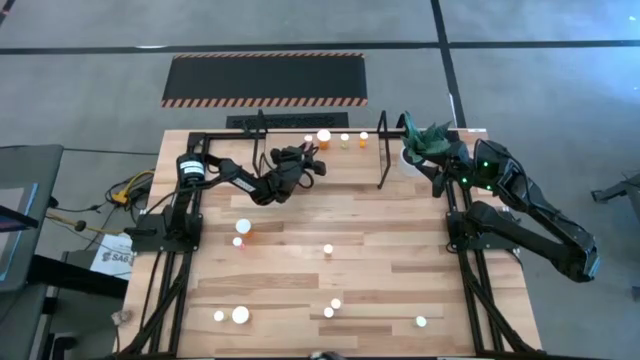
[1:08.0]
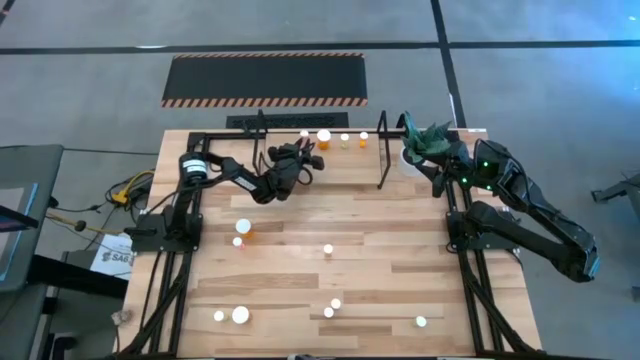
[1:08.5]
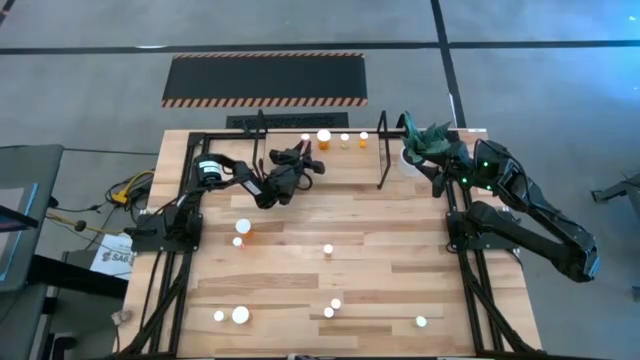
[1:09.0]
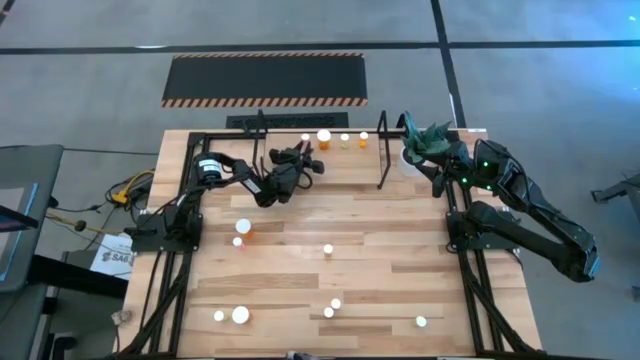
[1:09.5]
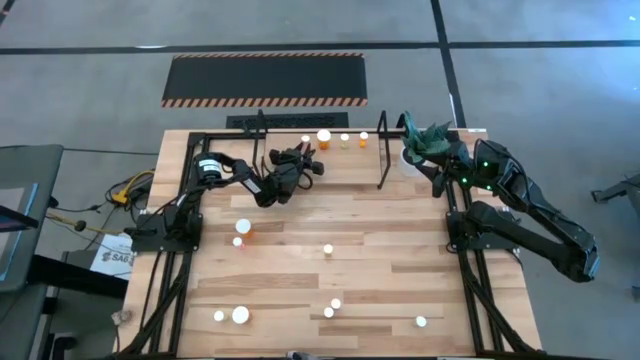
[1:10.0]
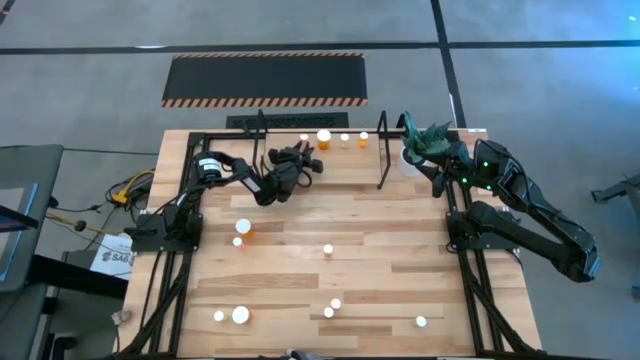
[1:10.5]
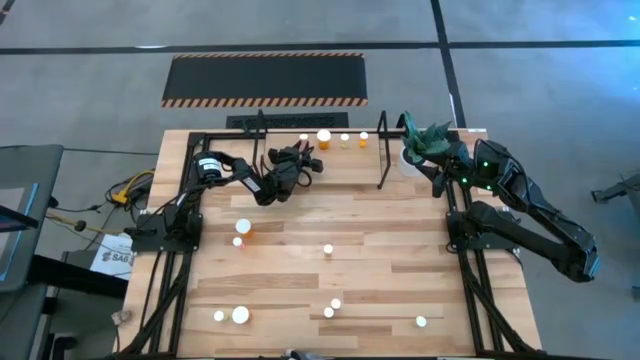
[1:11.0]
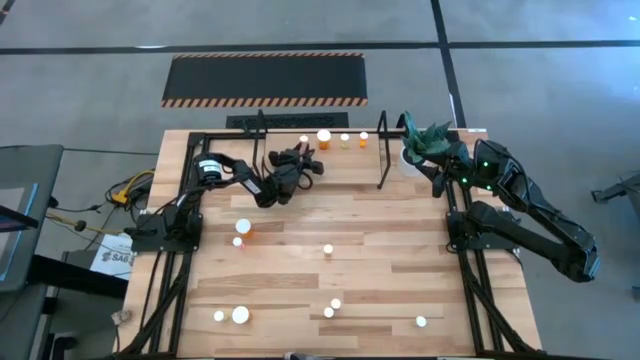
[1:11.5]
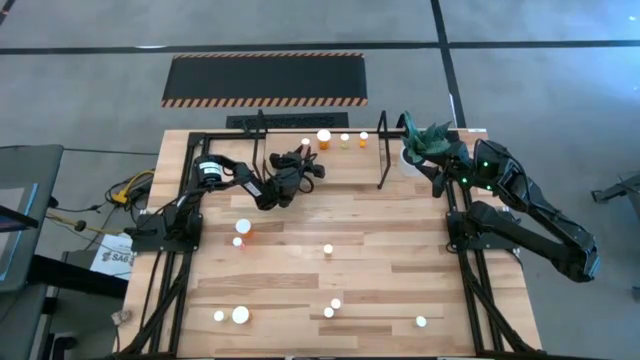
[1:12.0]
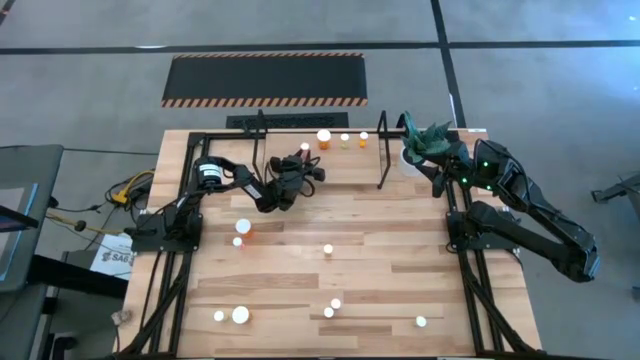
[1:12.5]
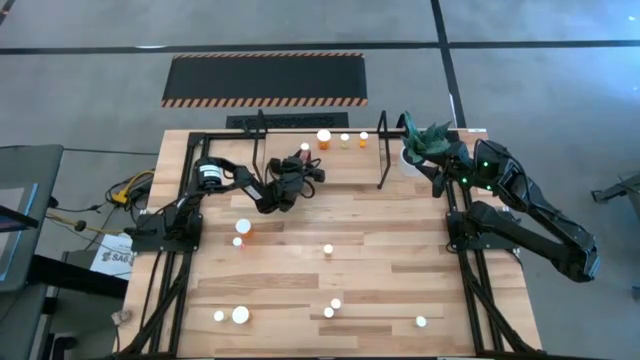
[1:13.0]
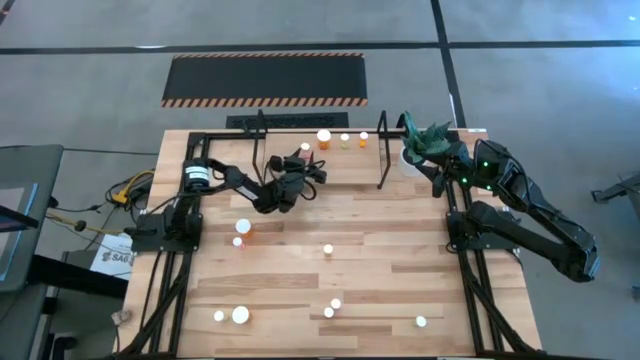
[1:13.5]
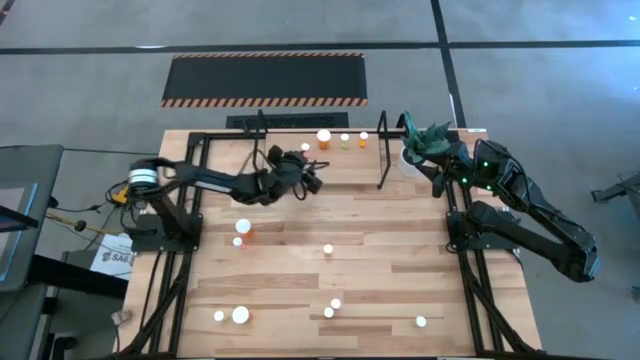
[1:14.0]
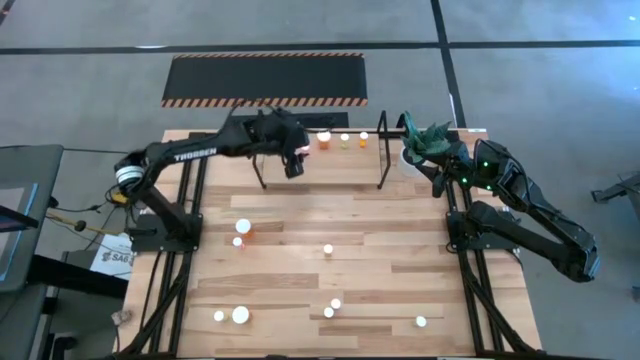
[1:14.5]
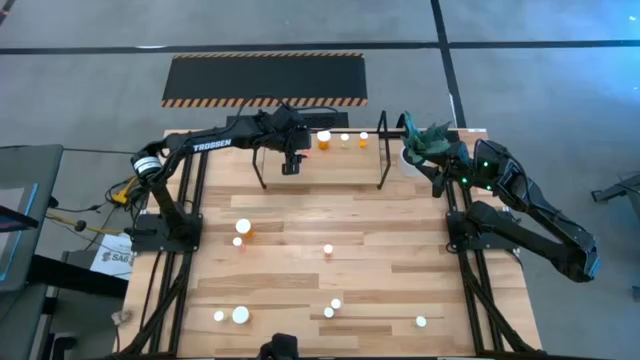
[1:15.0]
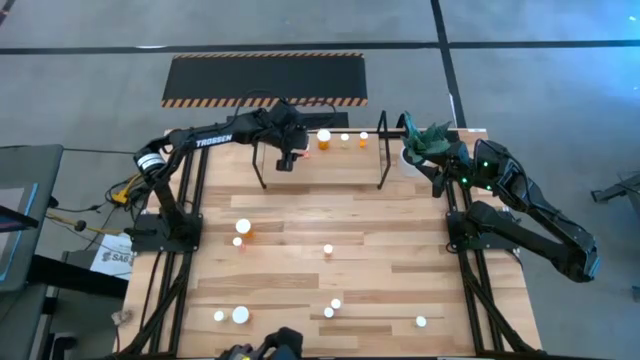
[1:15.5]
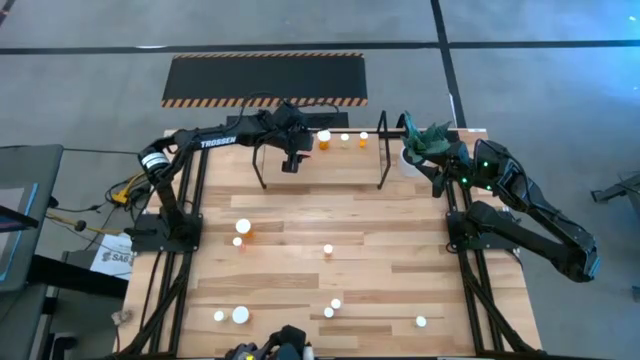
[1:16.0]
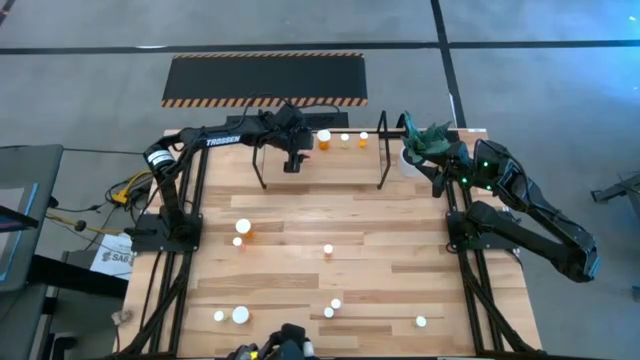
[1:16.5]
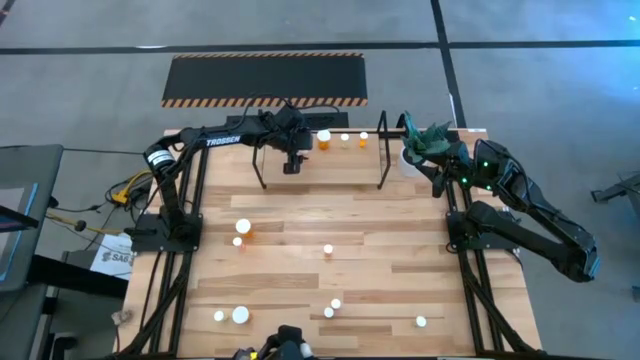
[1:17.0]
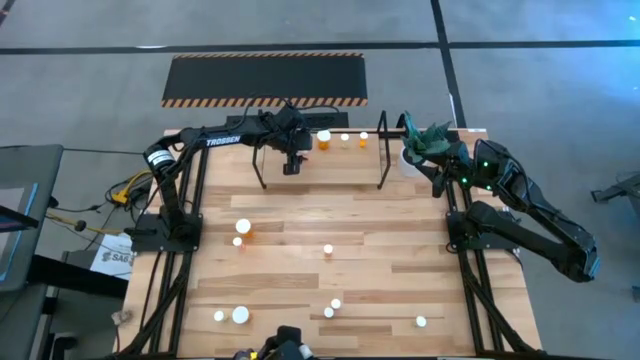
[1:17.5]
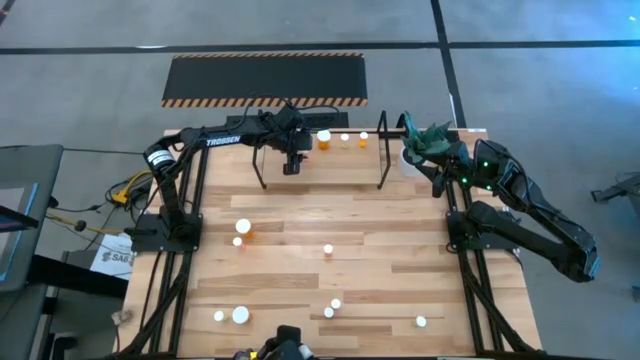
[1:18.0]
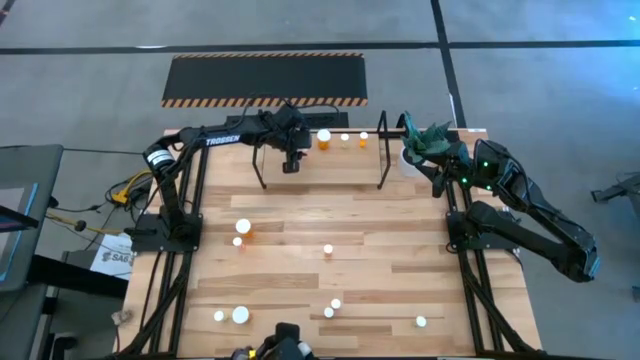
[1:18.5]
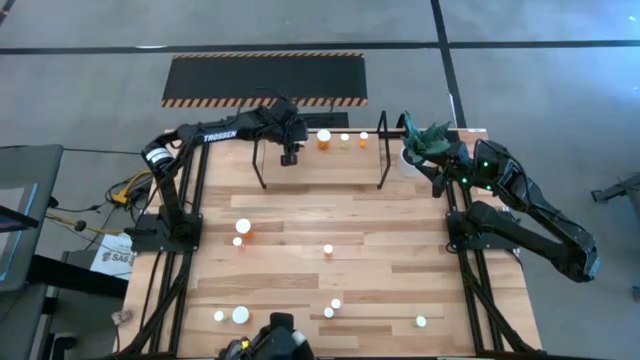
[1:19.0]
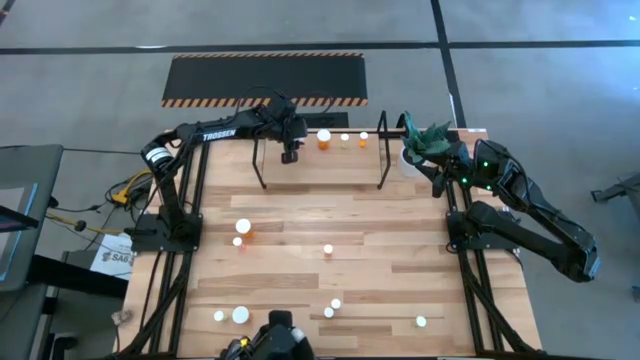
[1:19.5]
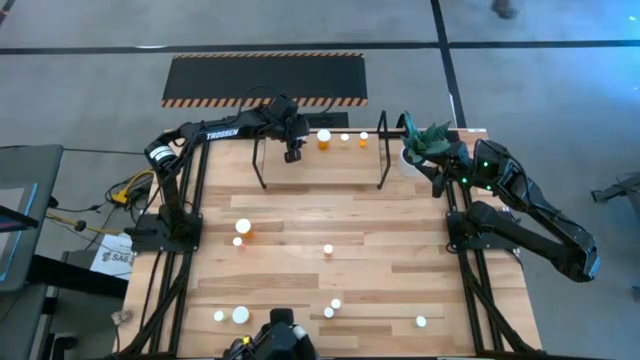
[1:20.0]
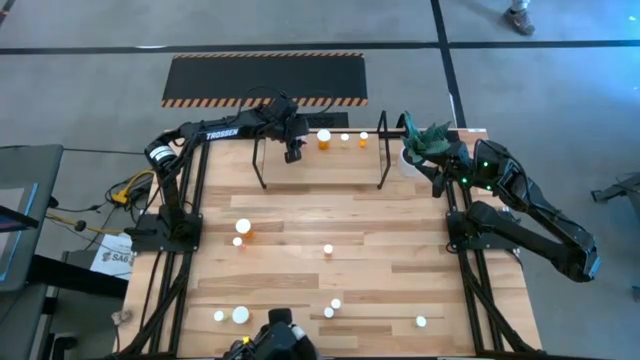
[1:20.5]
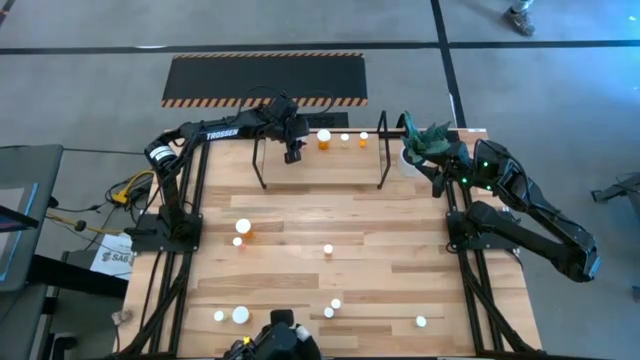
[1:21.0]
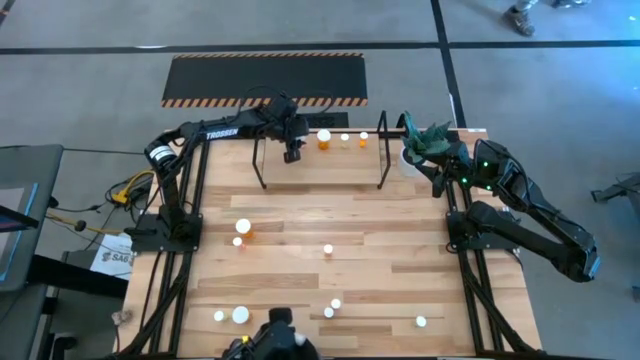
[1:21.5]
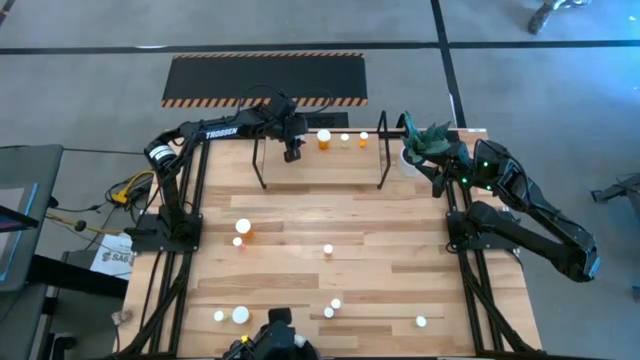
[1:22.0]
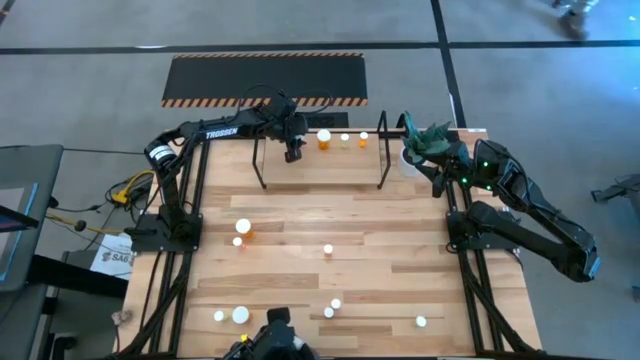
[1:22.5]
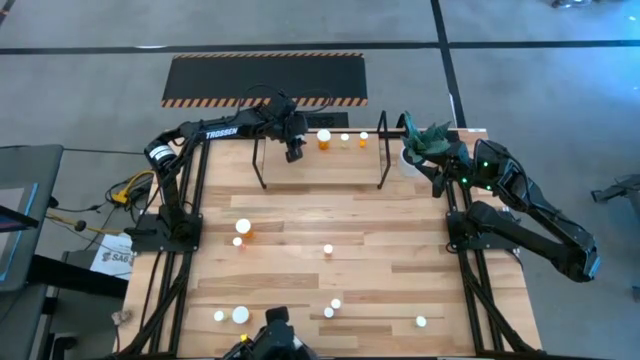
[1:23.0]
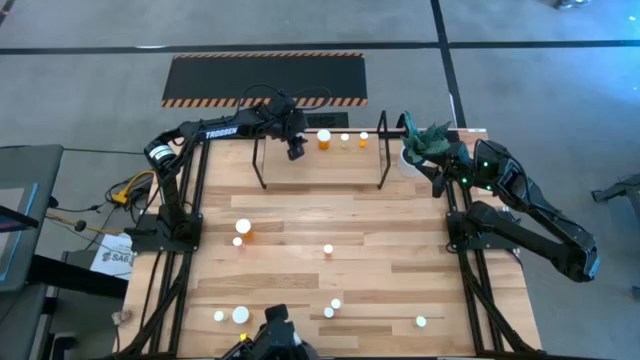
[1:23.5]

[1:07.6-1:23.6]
Task: Pick and place medicine bottles onto shelf by color
Put the top right small pink pill bottle on the shelf

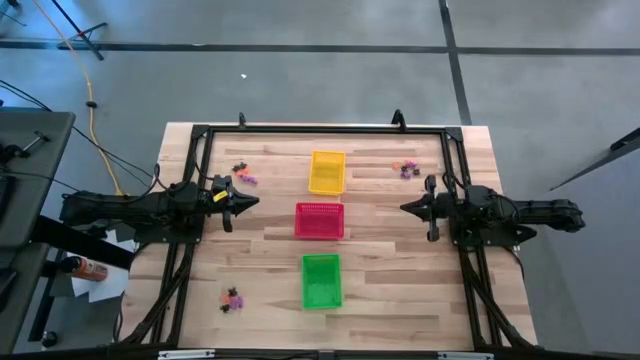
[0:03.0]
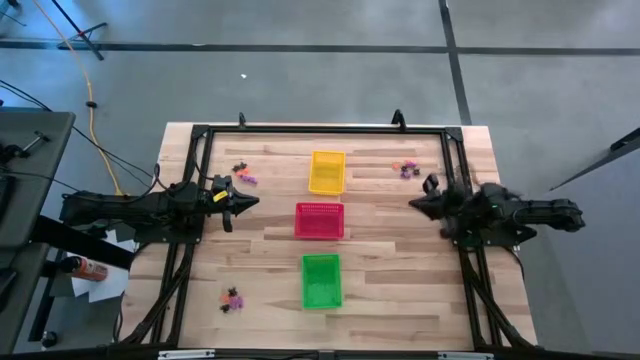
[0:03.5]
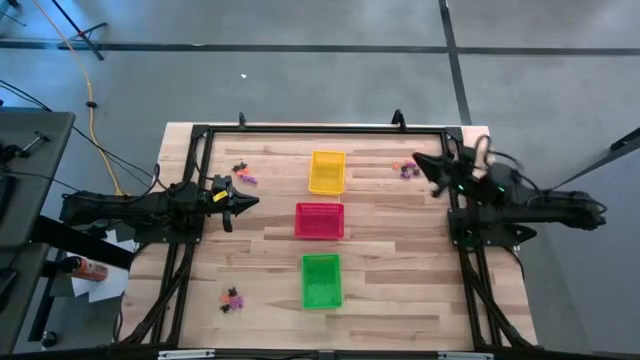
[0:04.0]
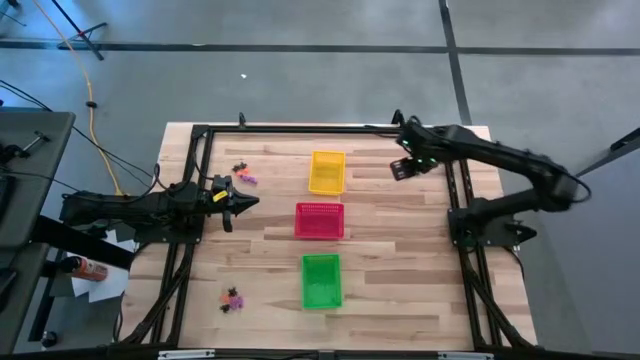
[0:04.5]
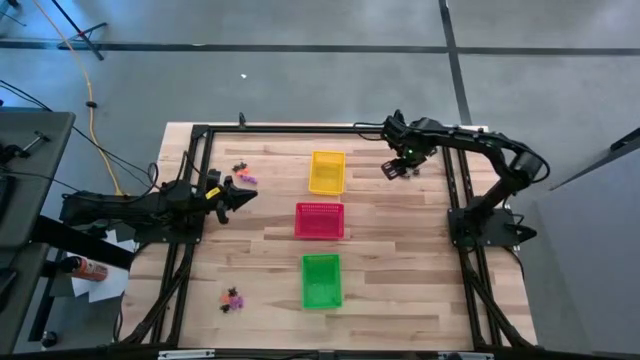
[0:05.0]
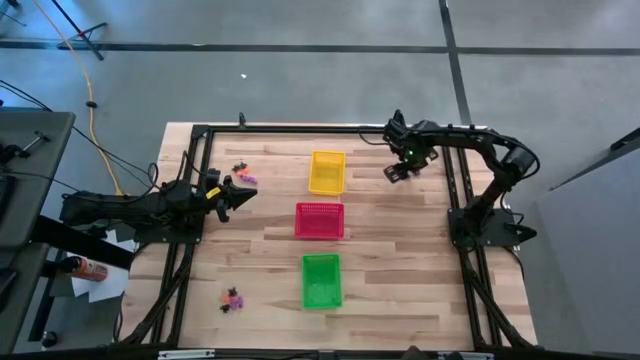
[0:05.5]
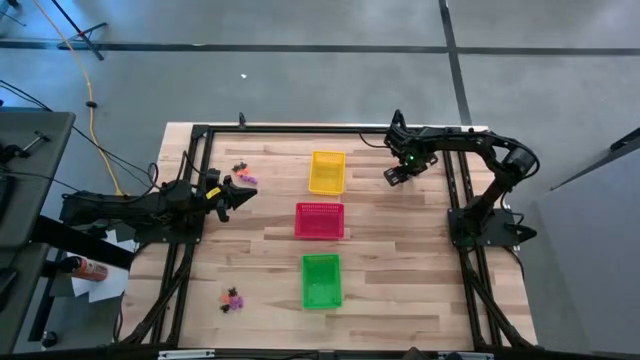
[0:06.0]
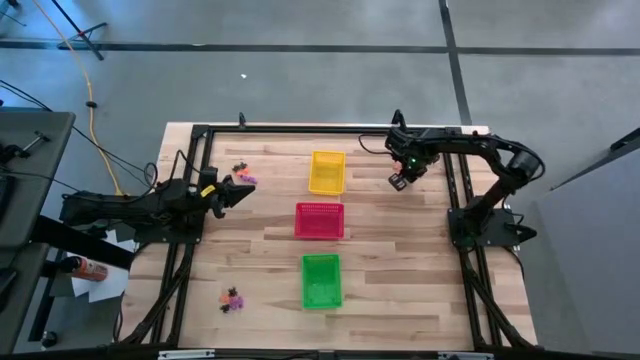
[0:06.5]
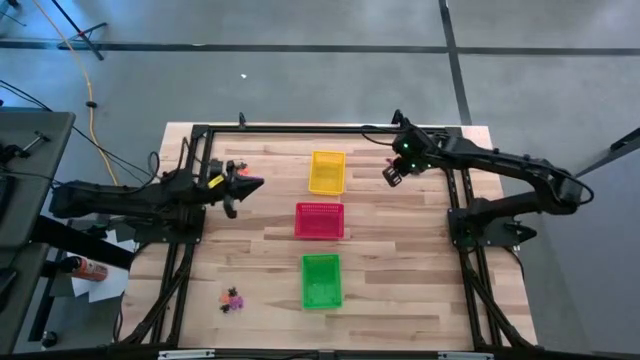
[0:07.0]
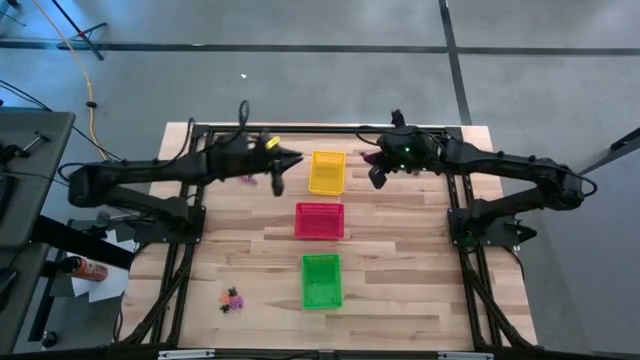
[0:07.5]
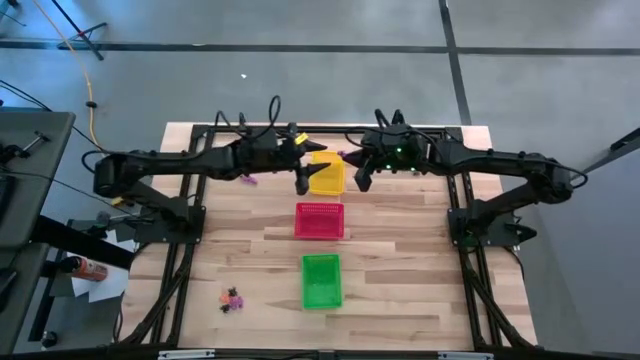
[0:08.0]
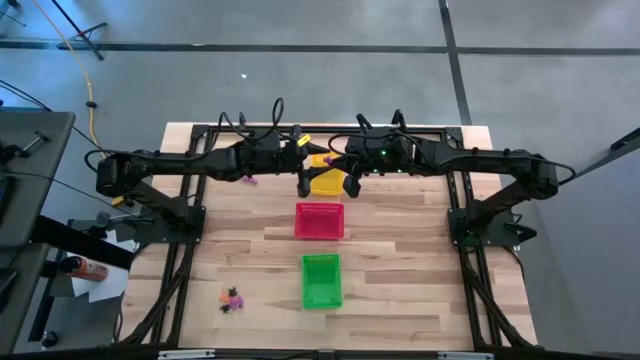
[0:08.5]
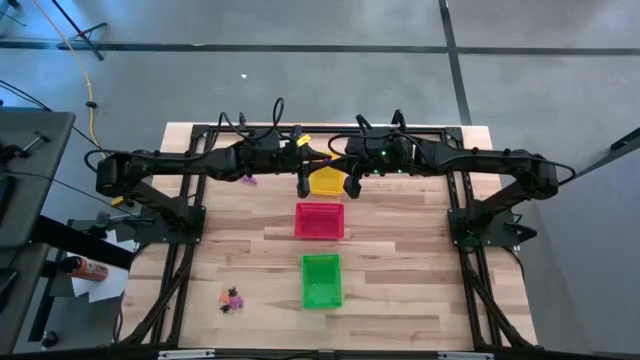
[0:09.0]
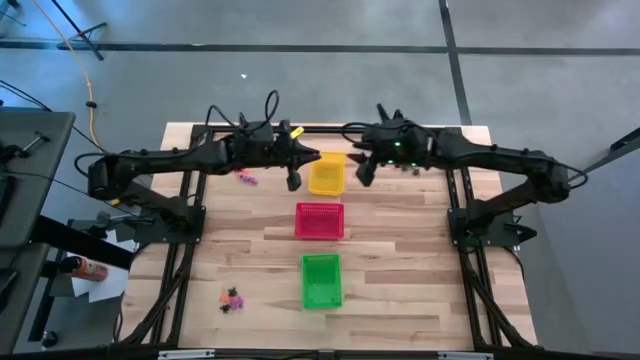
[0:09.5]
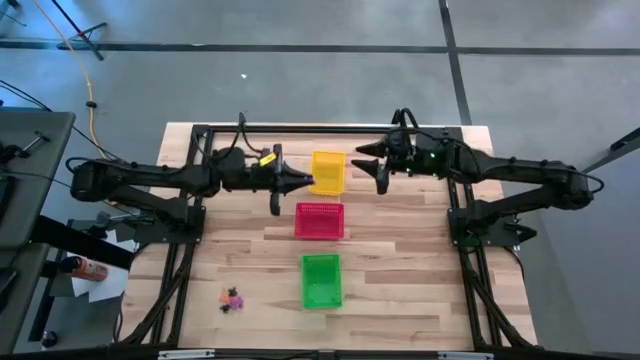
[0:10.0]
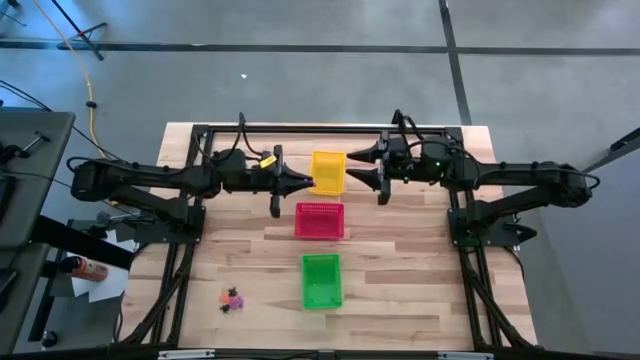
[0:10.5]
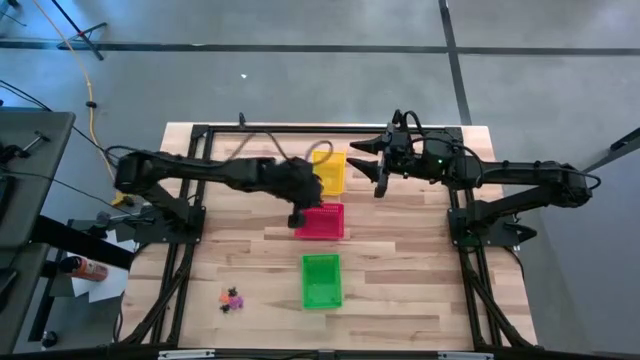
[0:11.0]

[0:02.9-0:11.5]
Task: Sort Halloween decoration
Put the purple skeleton toy into the red bin
